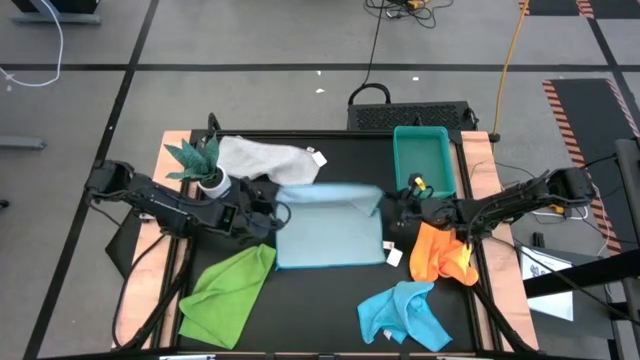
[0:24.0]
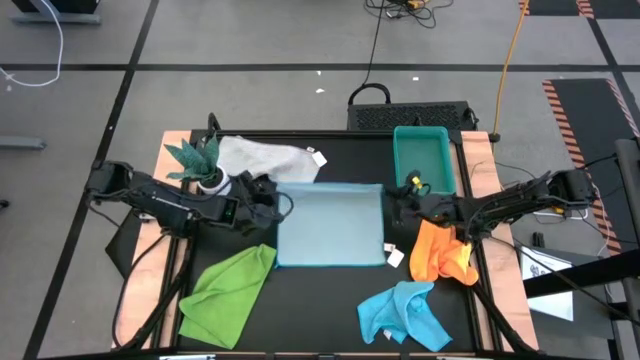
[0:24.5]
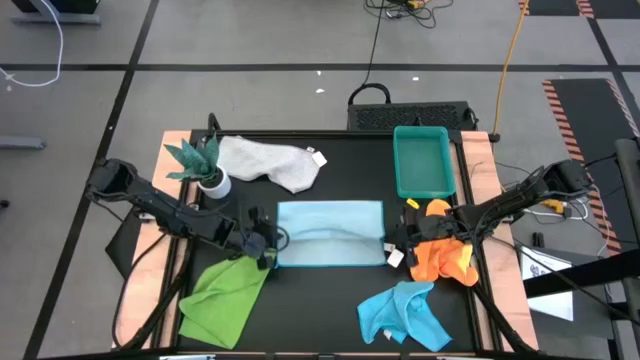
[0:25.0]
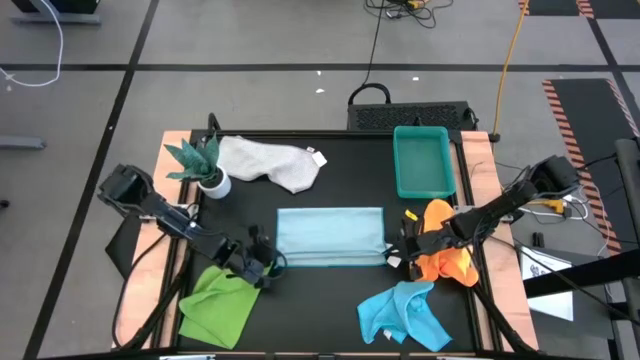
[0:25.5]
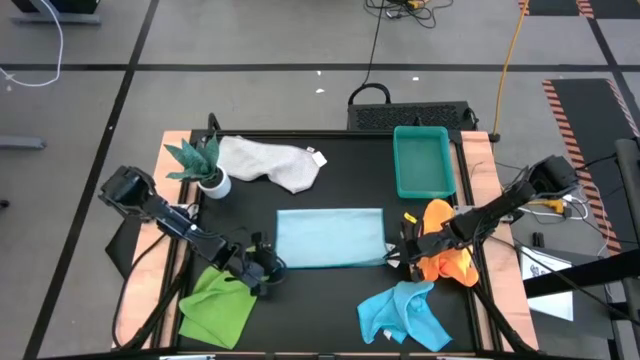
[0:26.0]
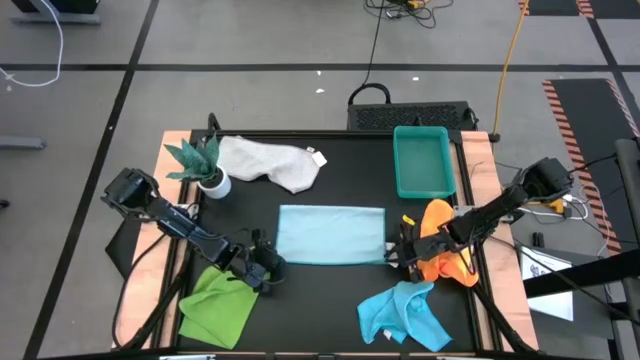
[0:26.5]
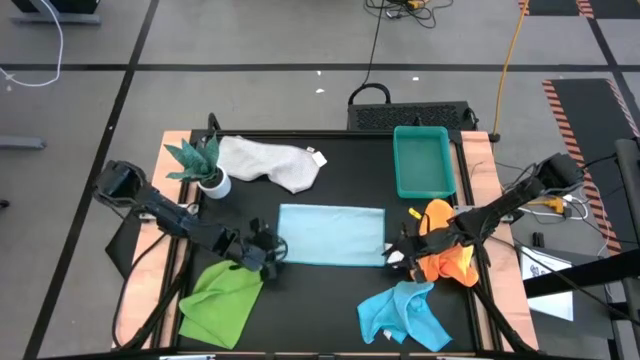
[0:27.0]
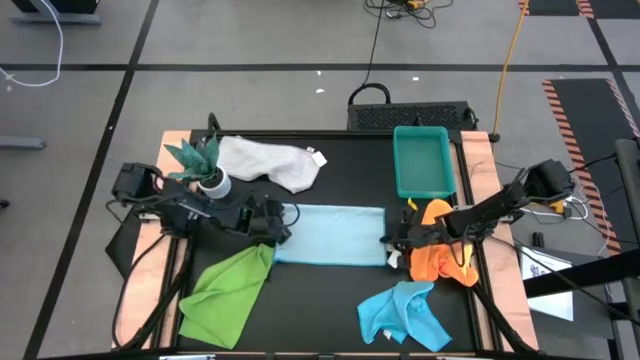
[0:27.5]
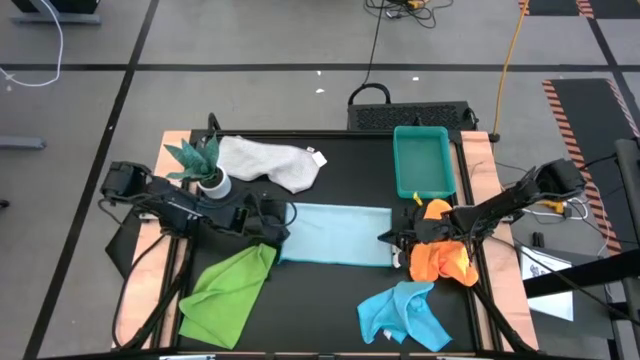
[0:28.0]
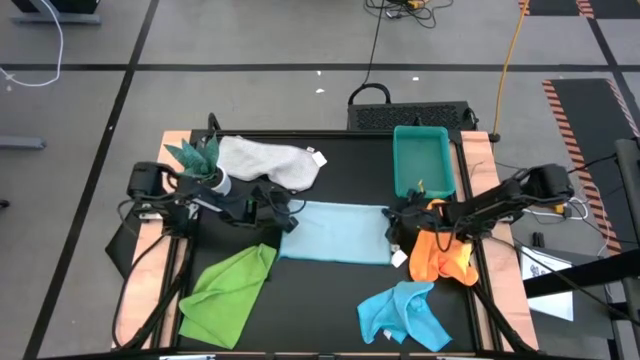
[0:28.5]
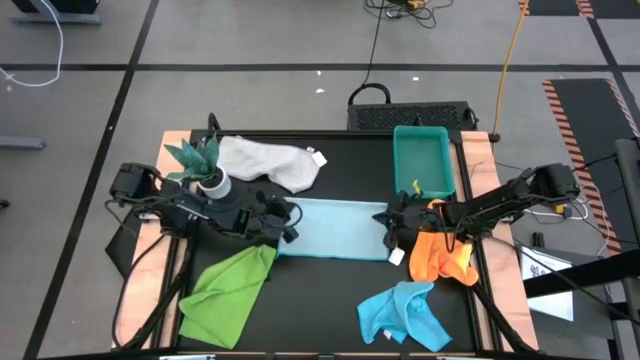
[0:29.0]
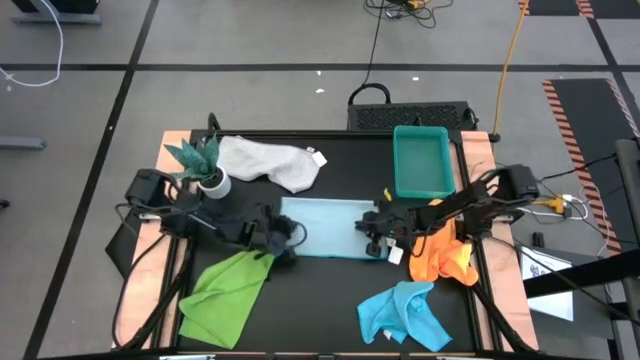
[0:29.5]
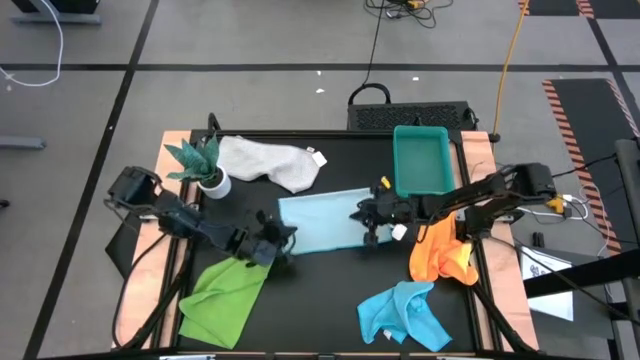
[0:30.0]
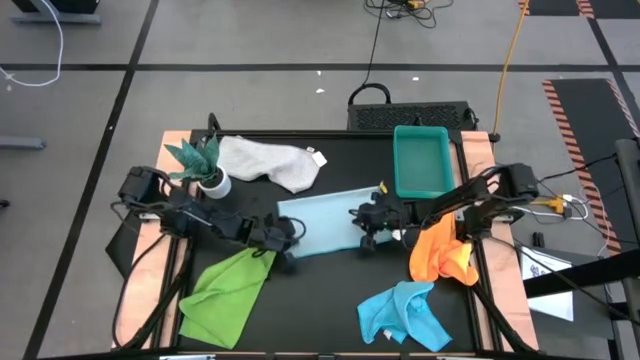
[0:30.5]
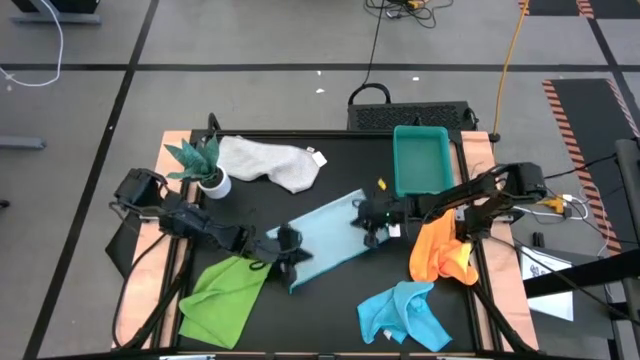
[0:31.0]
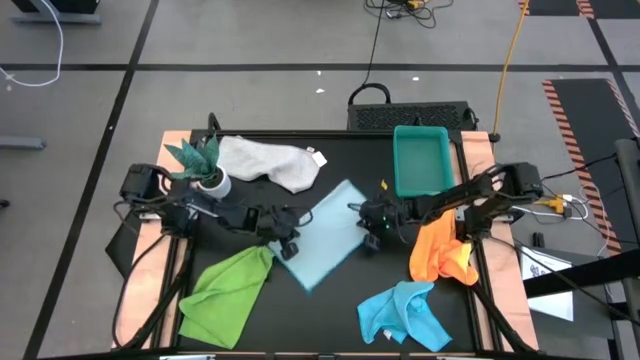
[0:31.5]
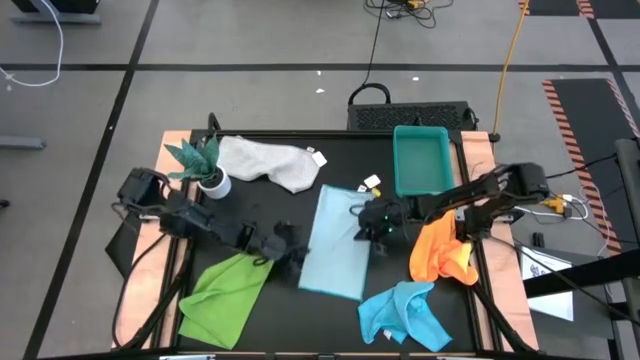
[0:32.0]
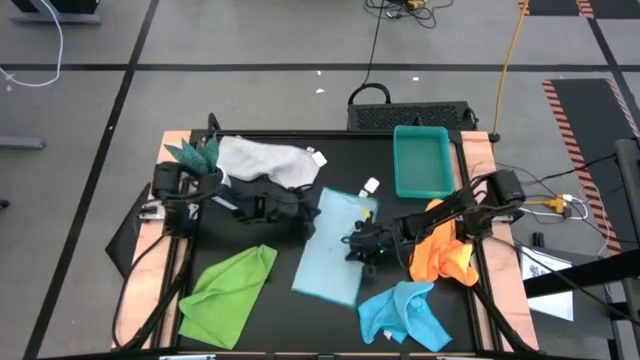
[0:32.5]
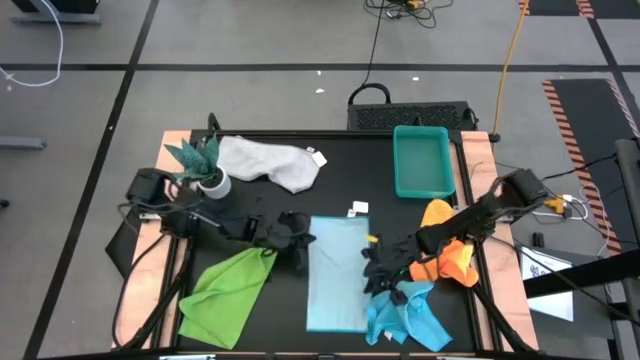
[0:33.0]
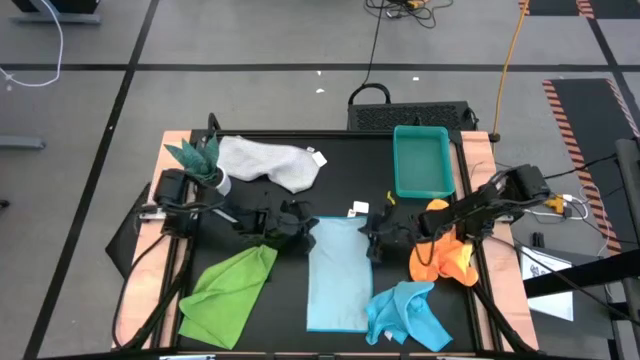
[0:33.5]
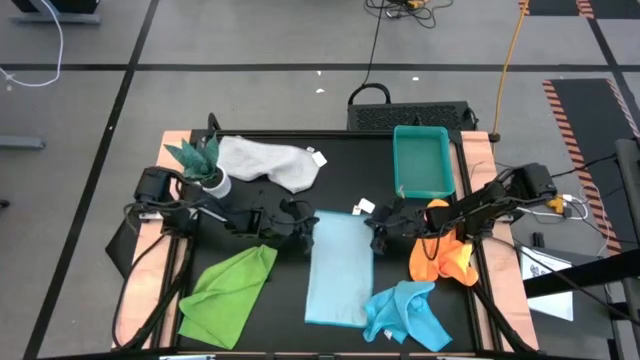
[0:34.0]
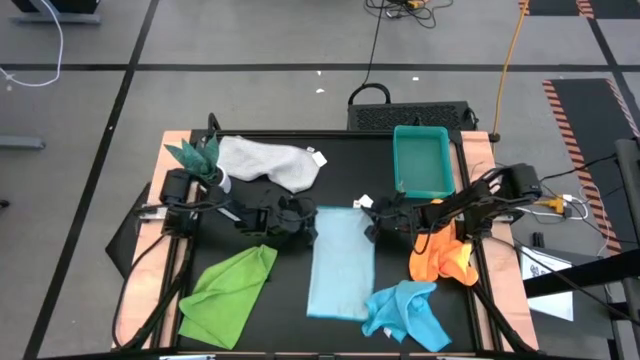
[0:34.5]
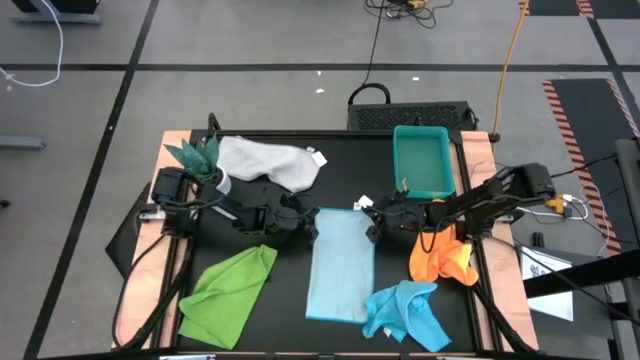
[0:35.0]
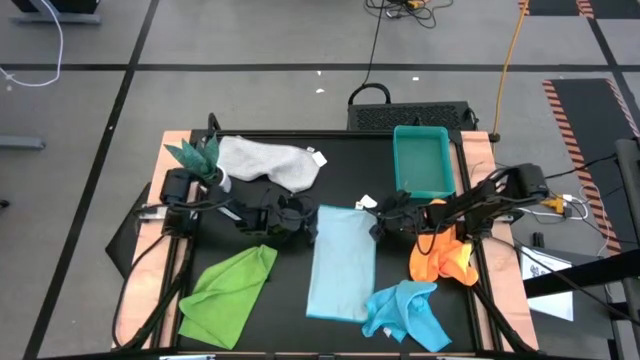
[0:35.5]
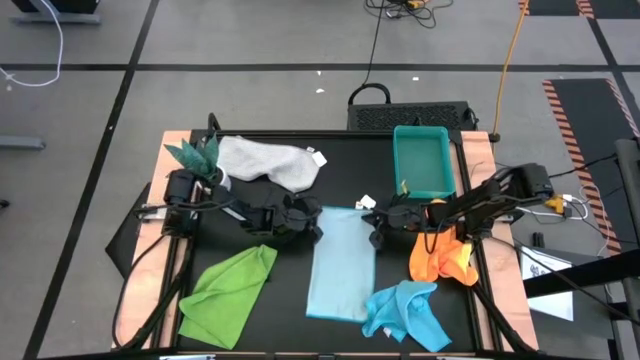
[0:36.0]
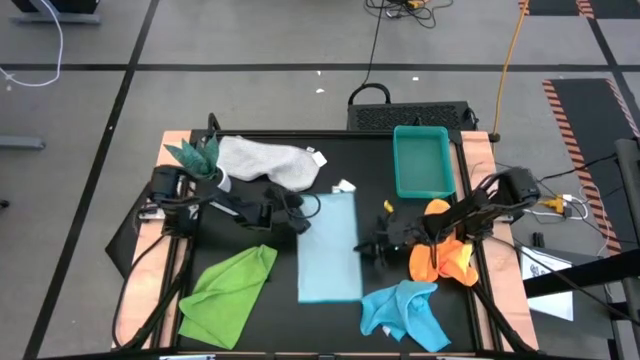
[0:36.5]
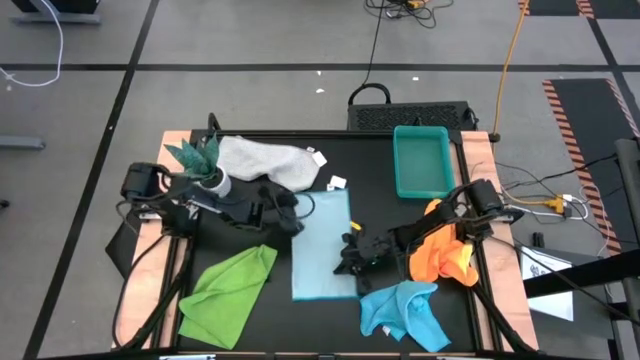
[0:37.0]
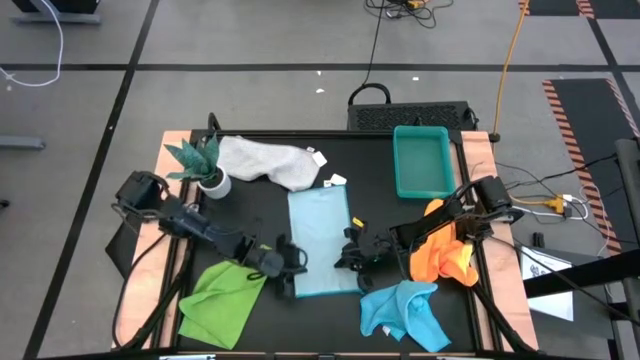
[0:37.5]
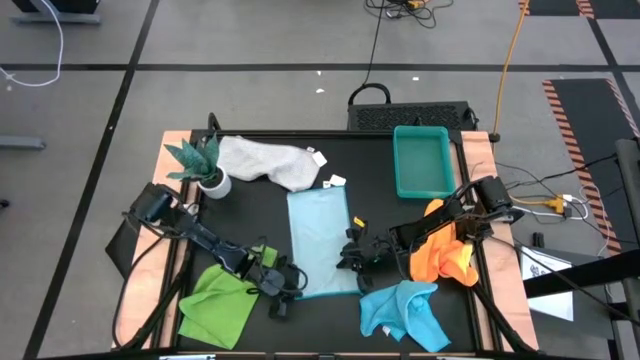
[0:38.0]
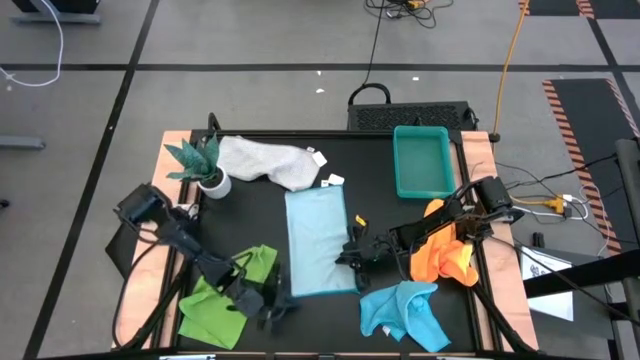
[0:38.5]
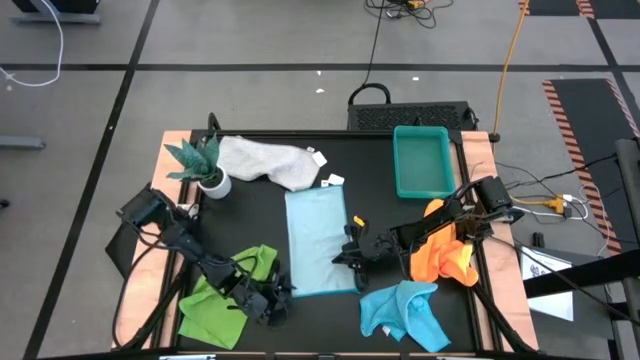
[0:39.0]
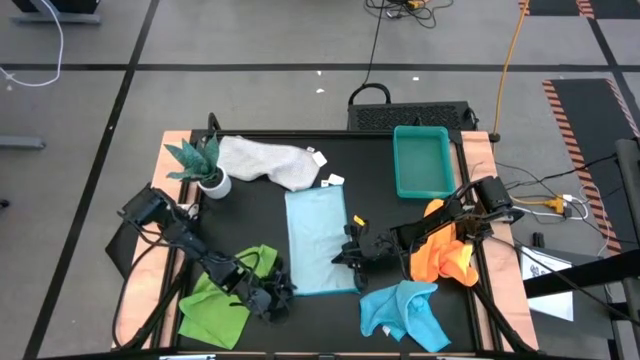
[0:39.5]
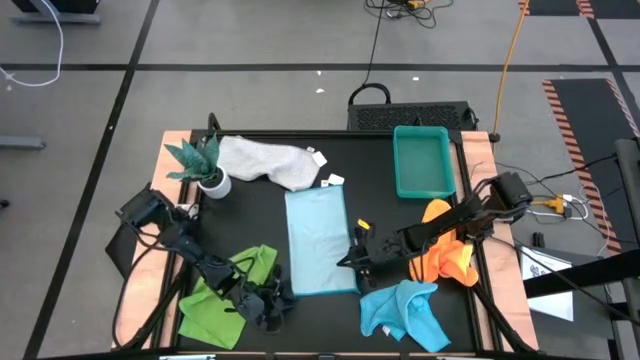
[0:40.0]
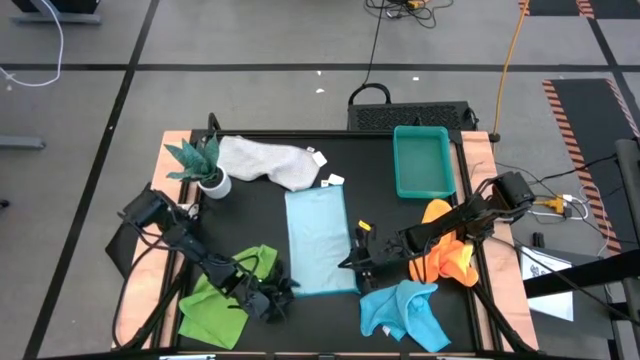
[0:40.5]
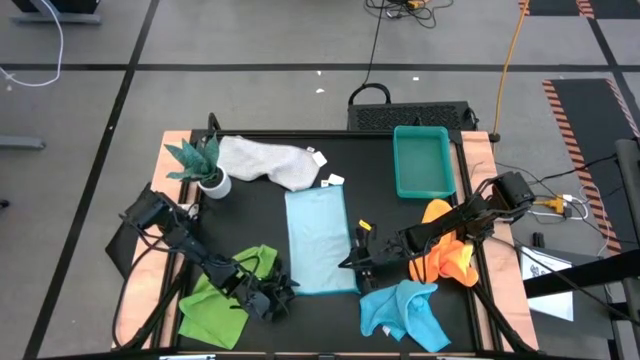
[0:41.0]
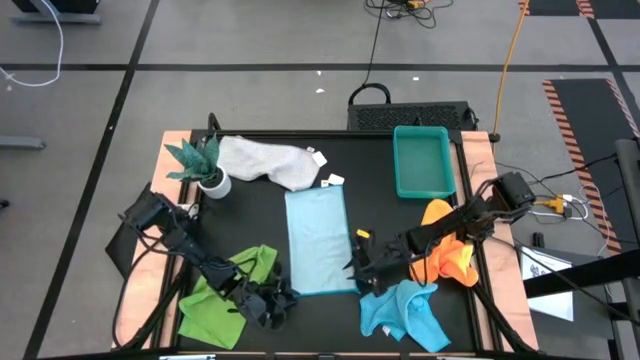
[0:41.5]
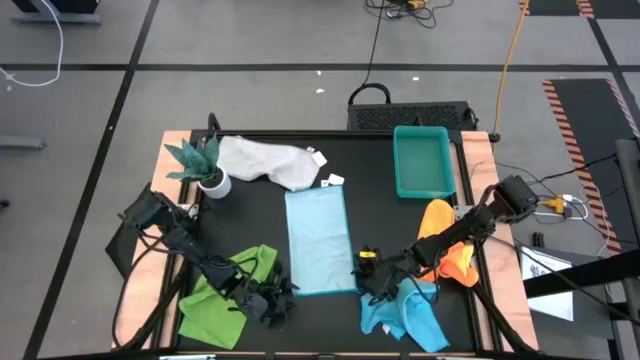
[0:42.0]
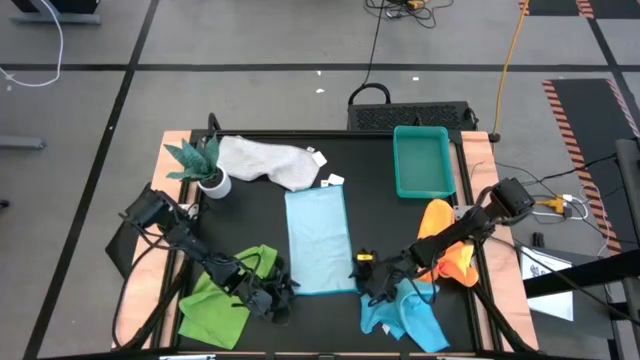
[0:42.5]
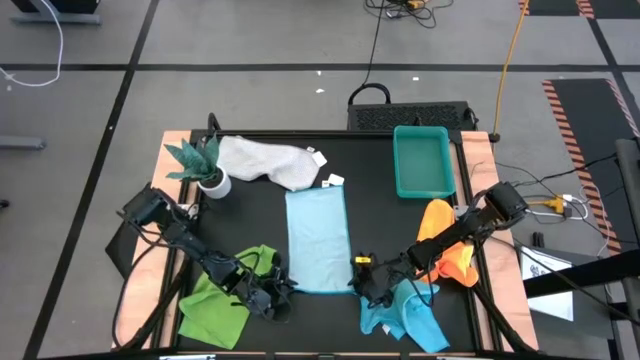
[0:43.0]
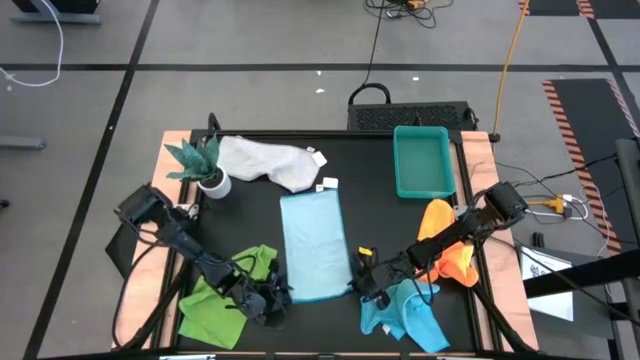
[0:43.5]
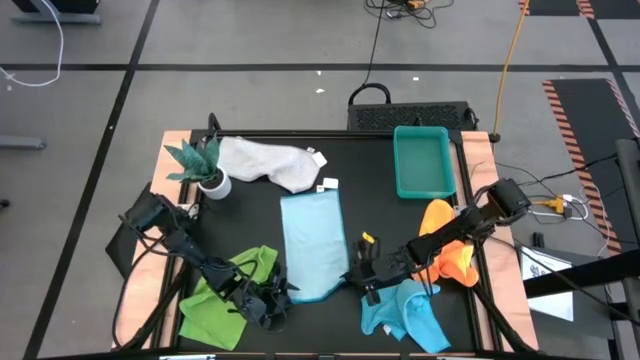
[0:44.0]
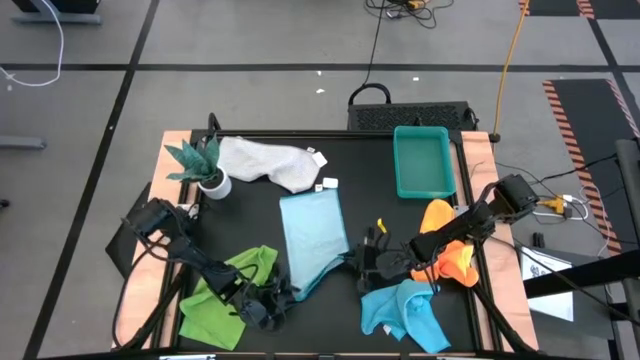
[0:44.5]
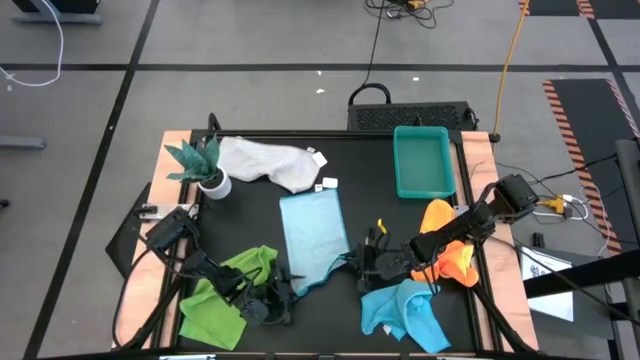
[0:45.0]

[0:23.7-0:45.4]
Task: Fold microfiber towels
Fold the light blue microfiber cloth
